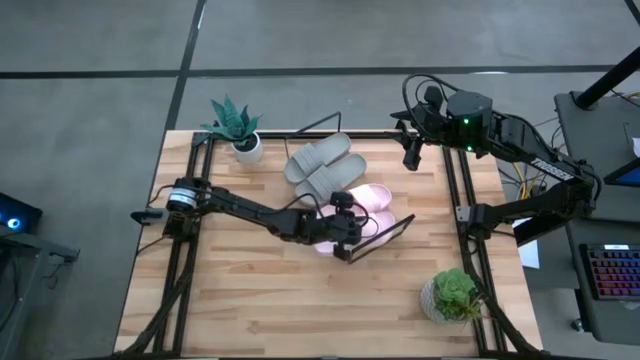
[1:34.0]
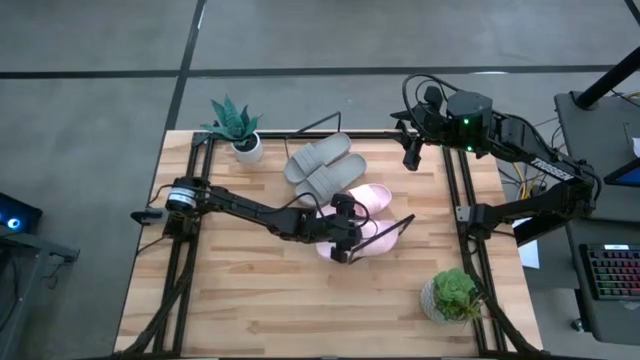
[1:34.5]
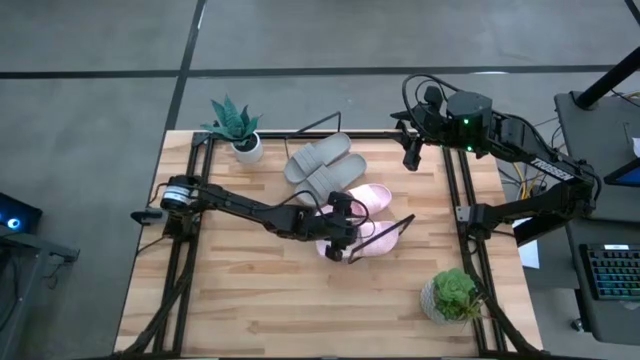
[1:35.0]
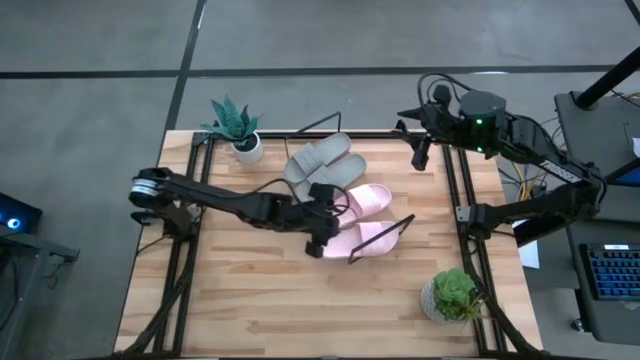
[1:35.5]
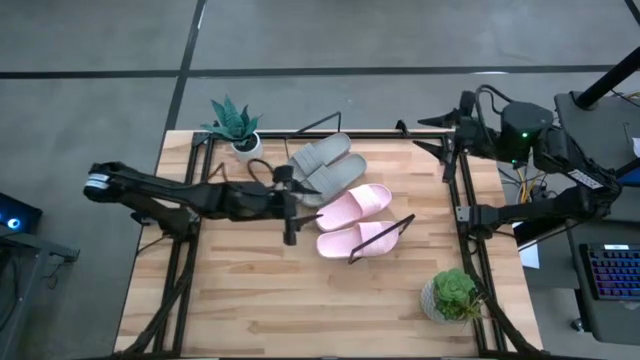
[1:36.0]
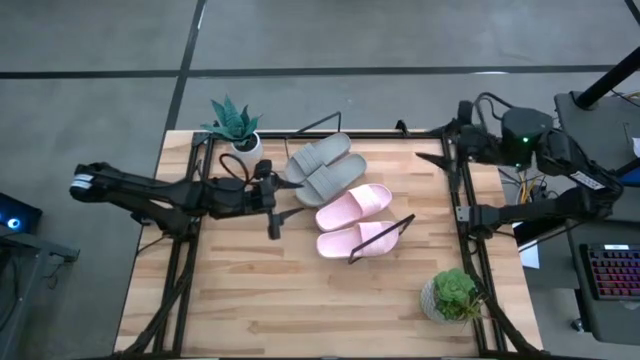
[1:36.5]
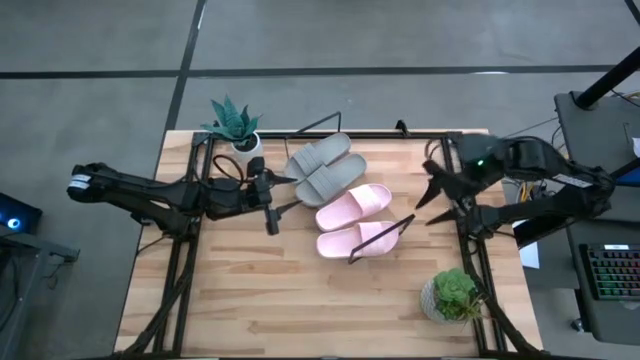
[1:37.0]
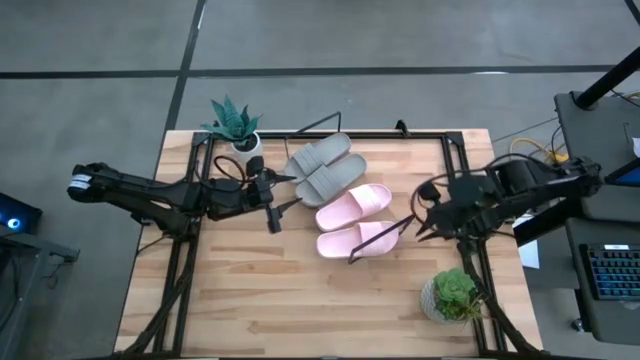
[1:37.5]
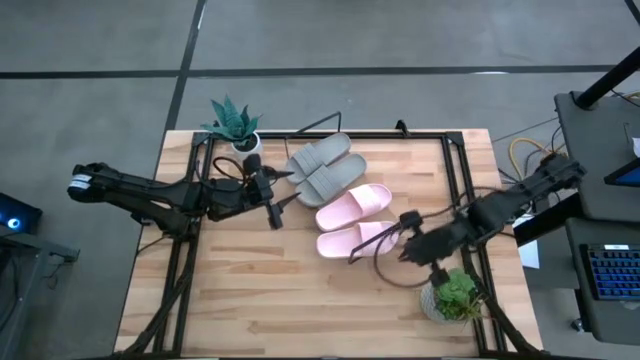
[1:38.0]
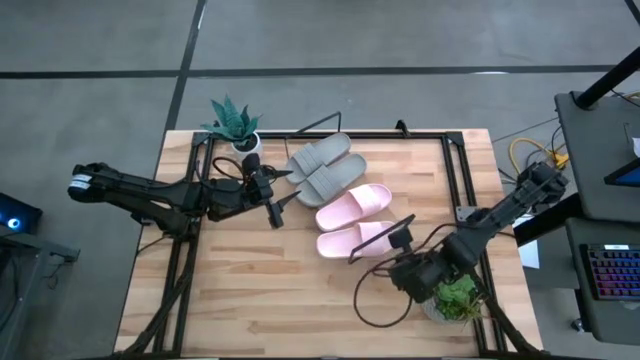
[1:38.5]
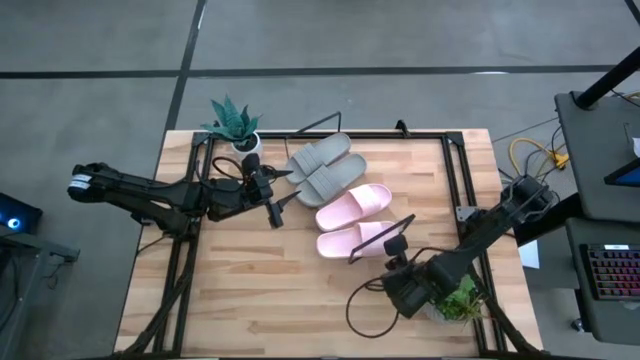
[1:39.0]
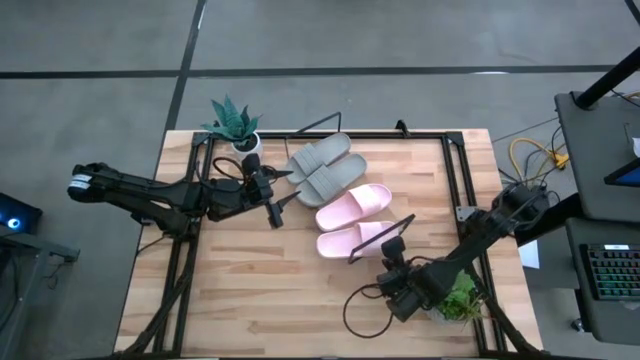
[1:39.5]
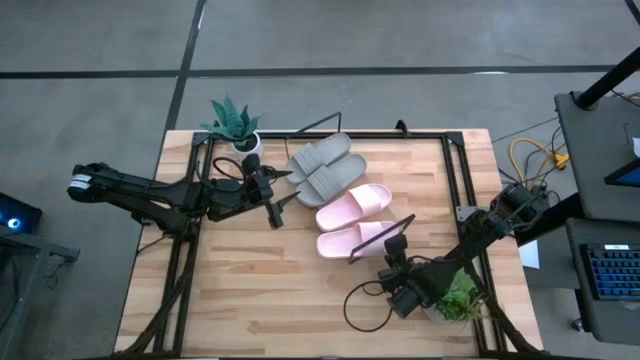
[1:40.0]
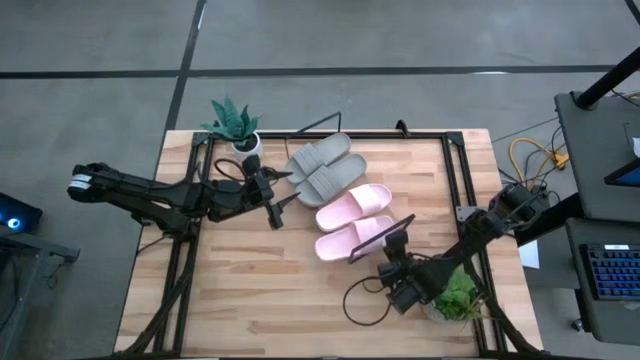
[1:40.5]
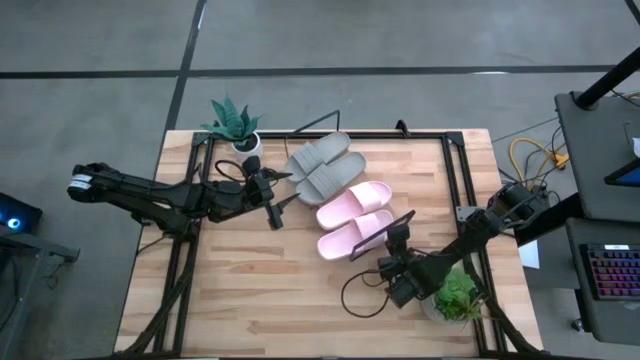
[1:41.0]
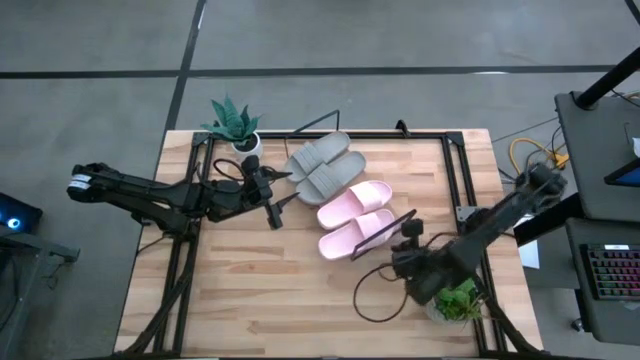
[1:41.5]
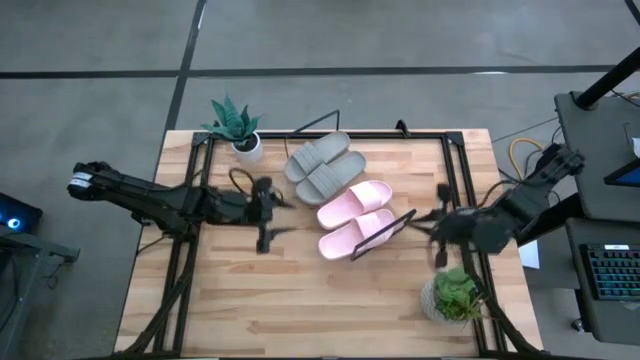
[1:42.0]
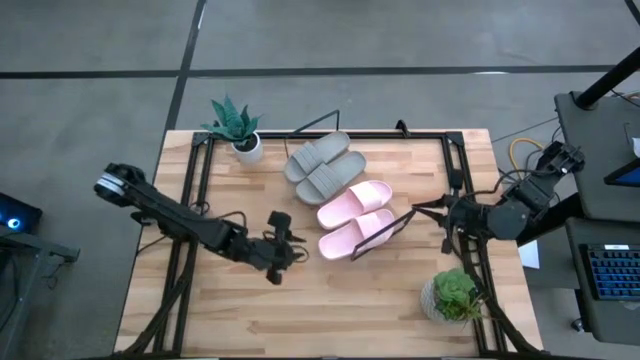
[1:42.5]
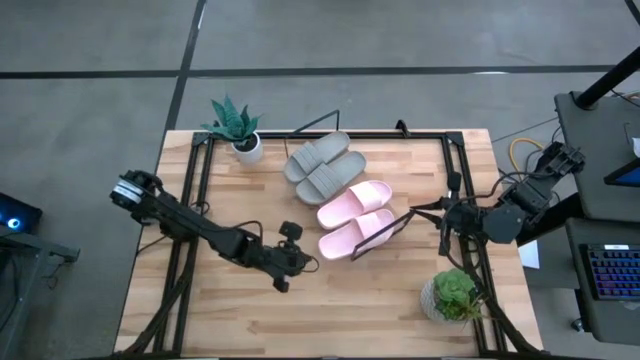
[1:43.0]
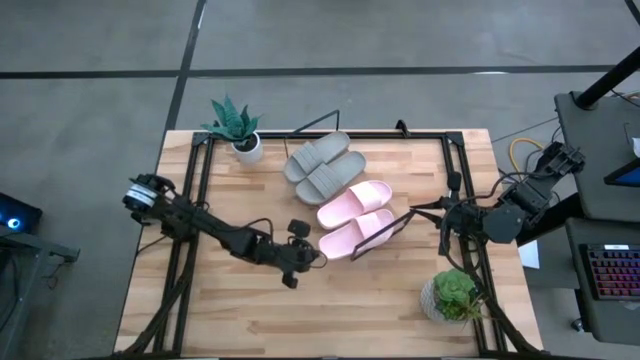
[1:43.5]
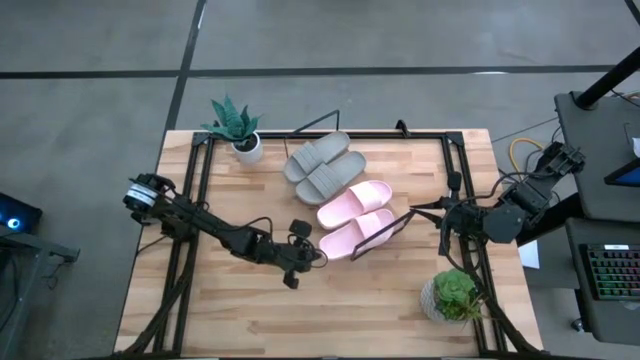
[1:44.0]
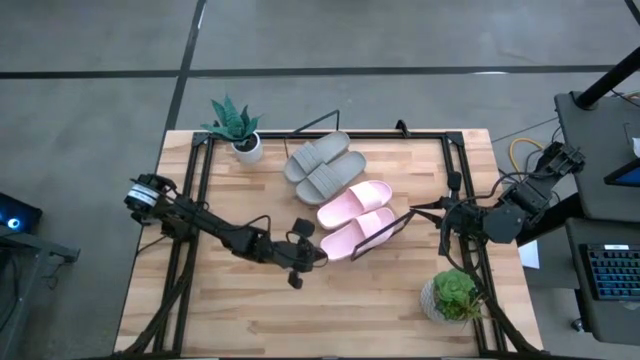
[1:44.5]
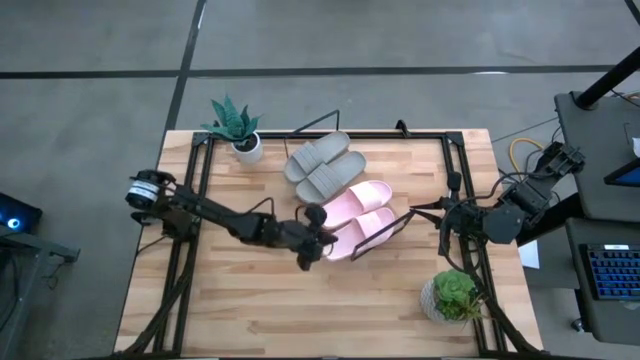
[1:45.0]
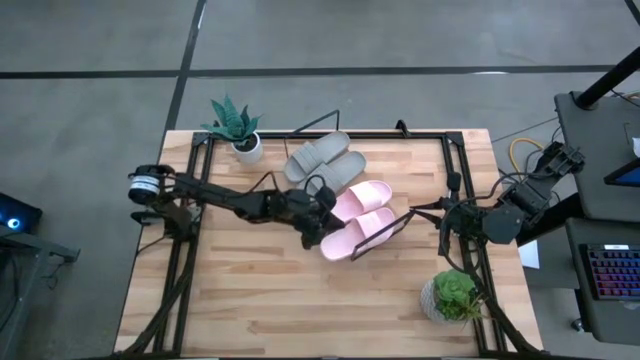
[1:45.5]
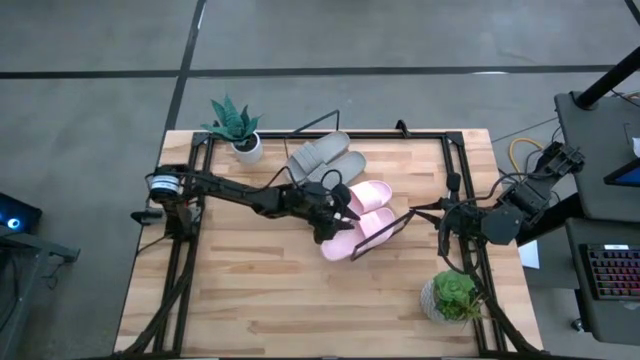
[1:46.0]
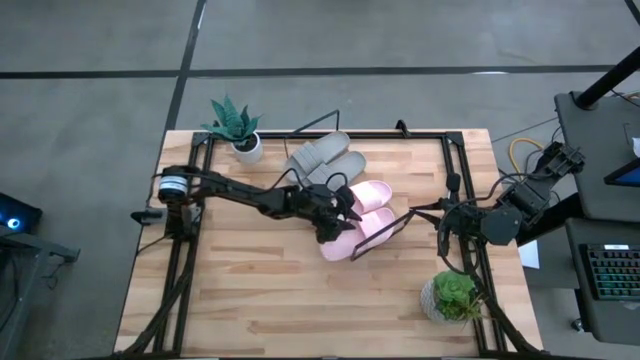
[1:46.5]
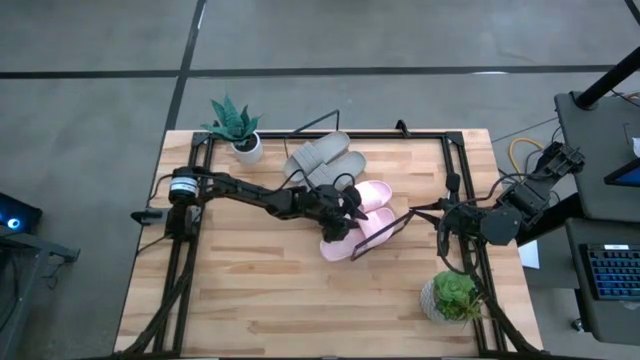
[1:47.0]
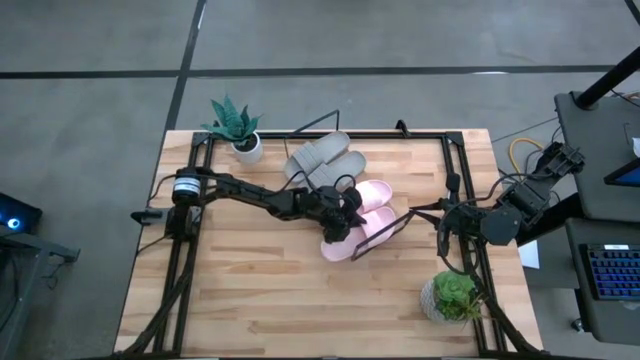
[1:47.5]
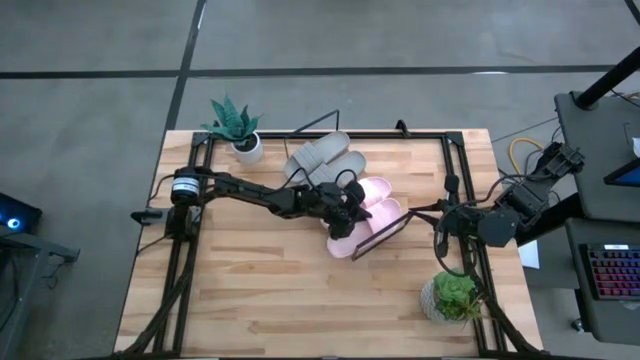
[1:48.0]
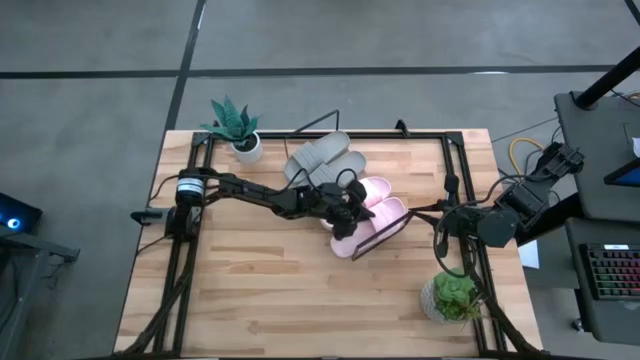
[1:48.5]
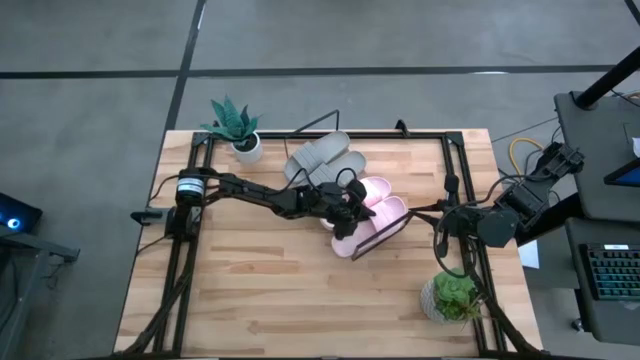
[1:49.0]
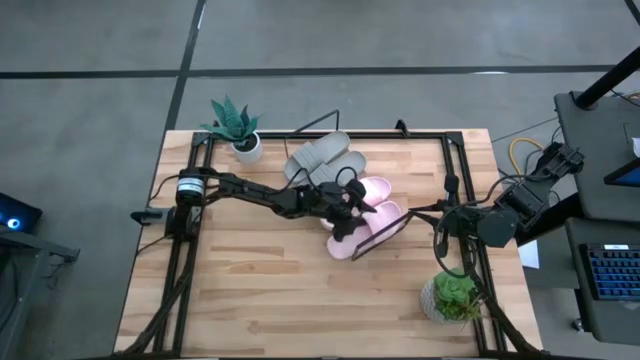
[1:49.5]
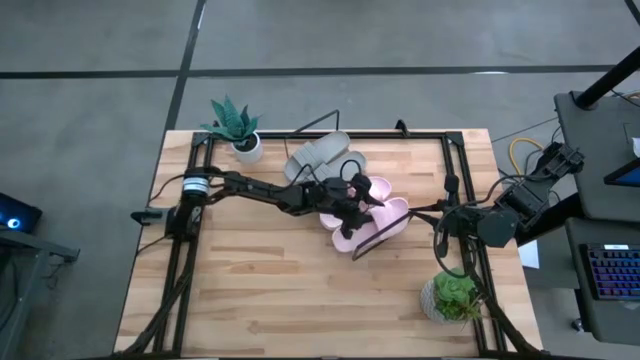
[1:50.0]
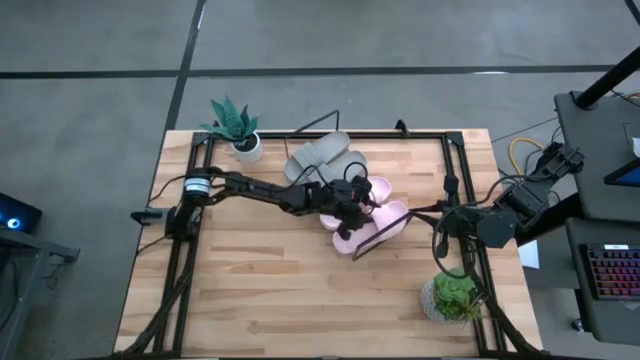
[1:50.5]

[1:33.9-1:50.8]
Task: Pick and place slides into the shelf
Put the pink slide on the shelf

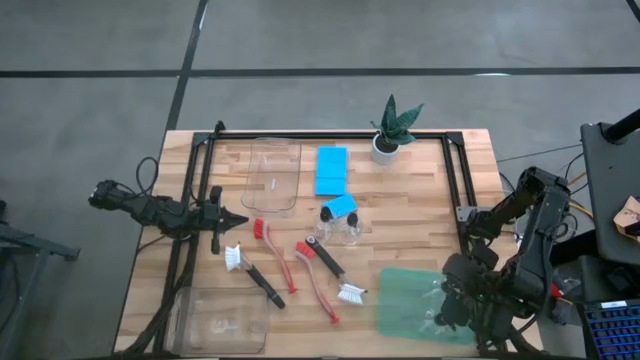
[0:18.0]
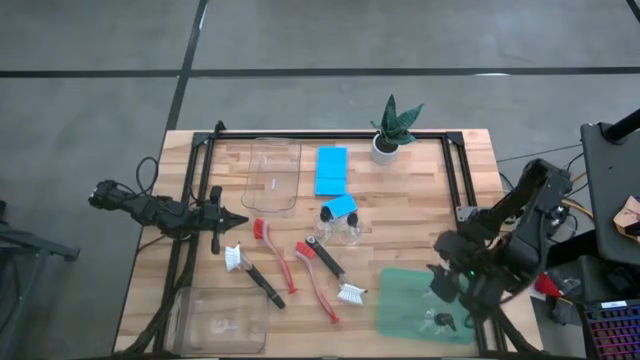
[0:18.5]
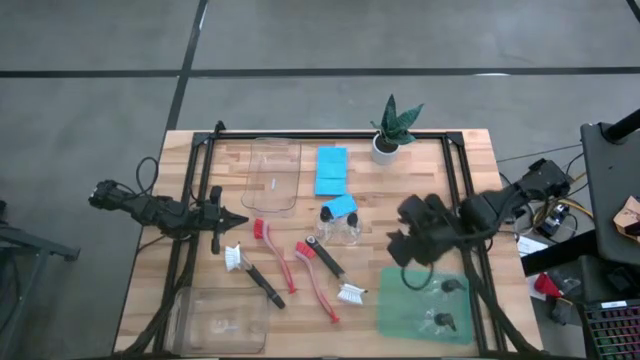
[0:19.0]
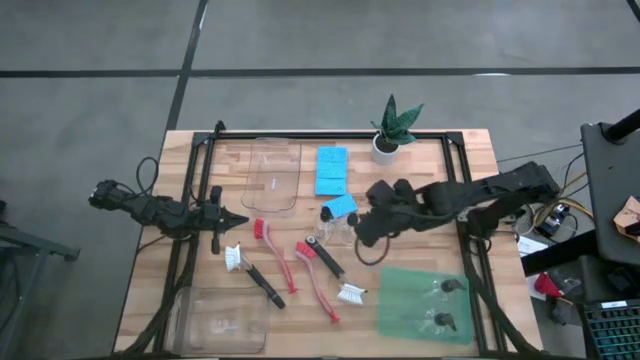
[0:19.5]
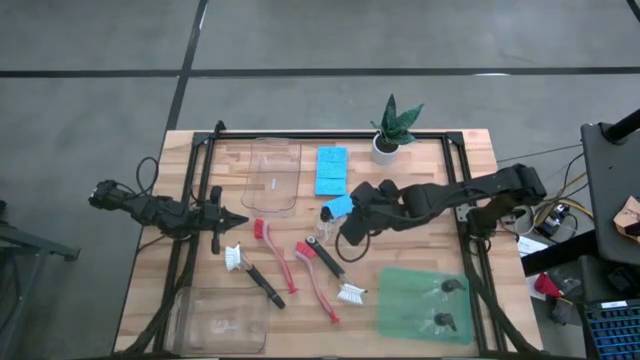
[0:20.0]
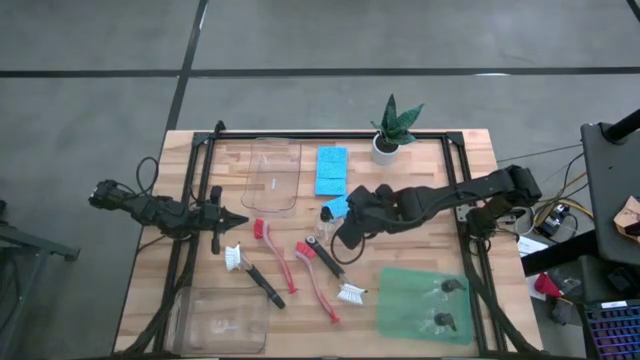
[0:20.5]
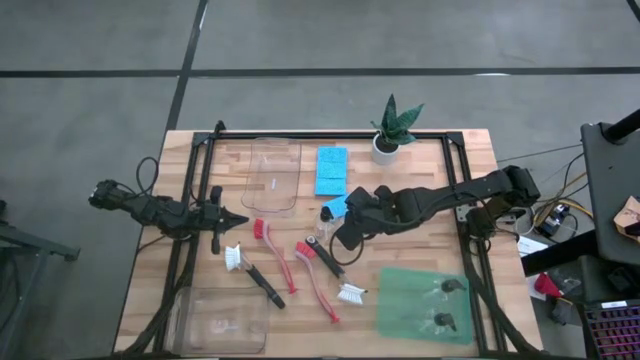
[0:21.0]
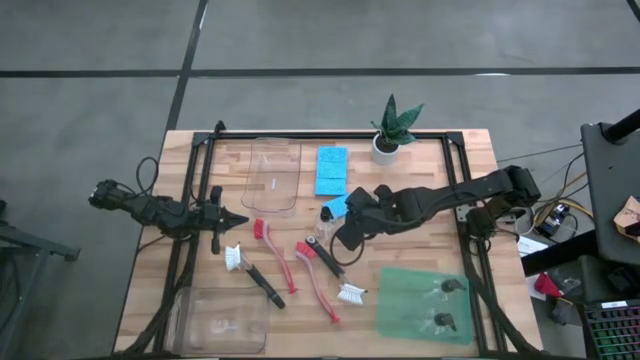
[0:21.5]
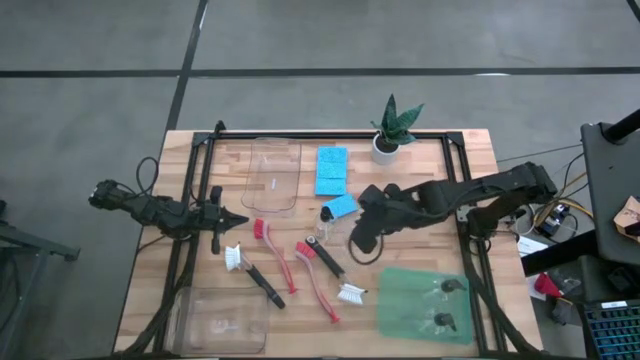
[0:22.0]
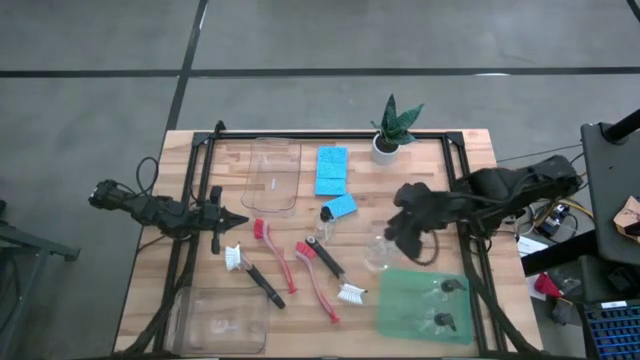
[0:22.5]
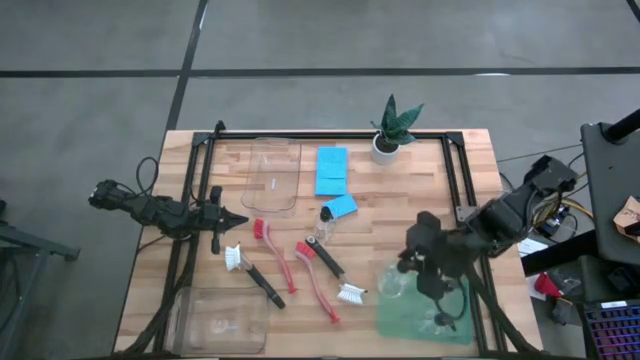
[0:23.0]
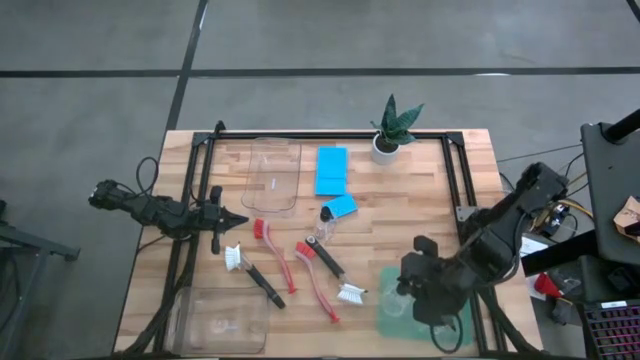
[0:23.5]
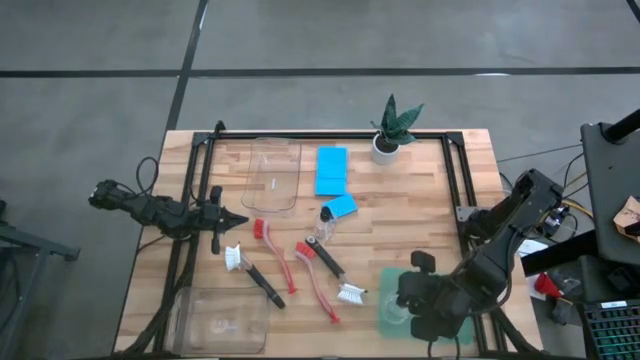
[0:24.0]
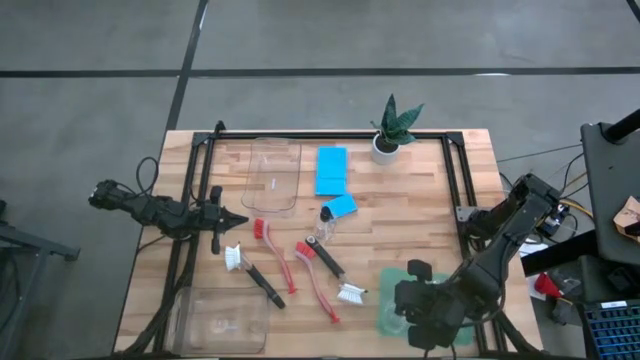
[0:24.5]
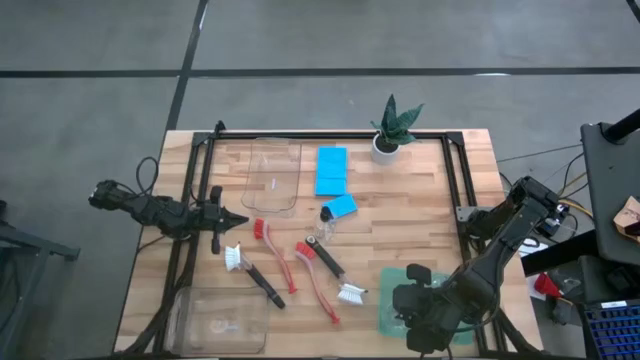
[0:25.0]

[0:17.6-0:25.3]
Task: Pick & Place Kitchen Sink Supplies
Put the sprayer bottle into the green bin
